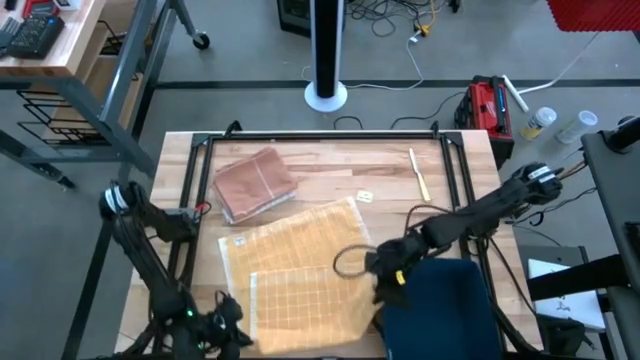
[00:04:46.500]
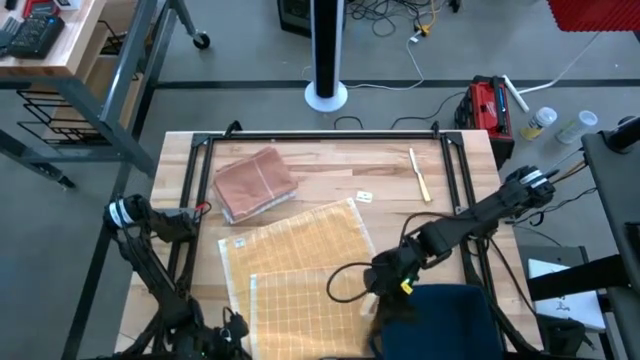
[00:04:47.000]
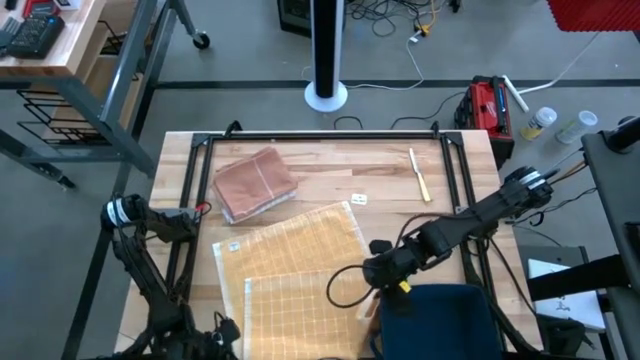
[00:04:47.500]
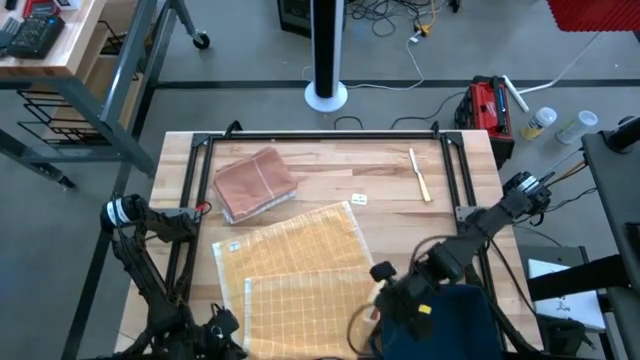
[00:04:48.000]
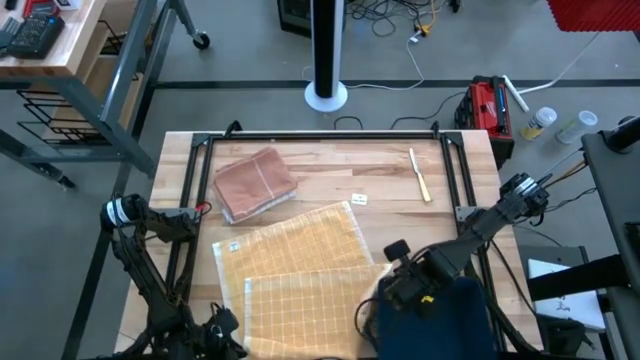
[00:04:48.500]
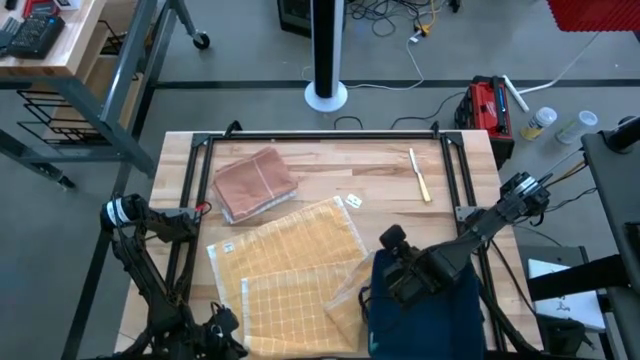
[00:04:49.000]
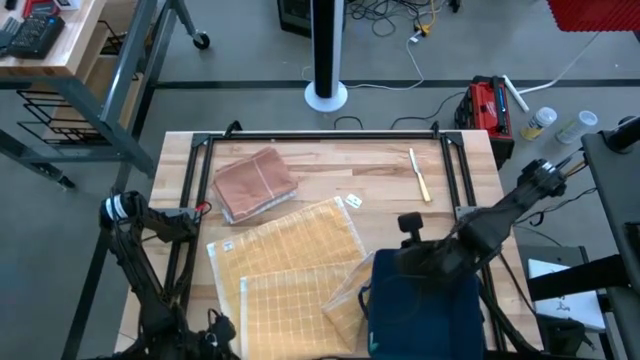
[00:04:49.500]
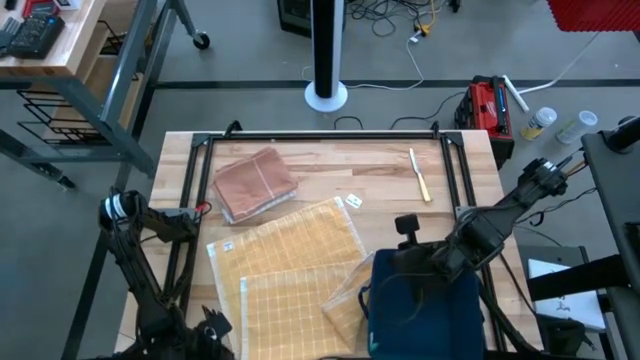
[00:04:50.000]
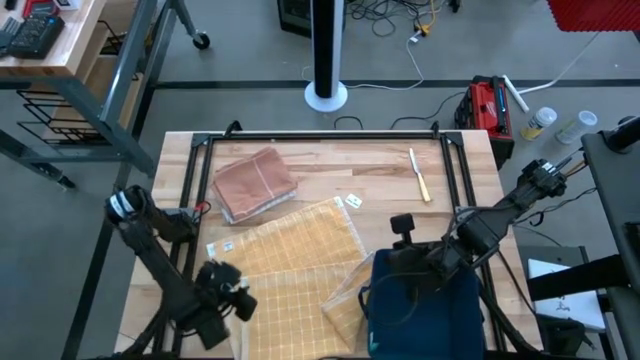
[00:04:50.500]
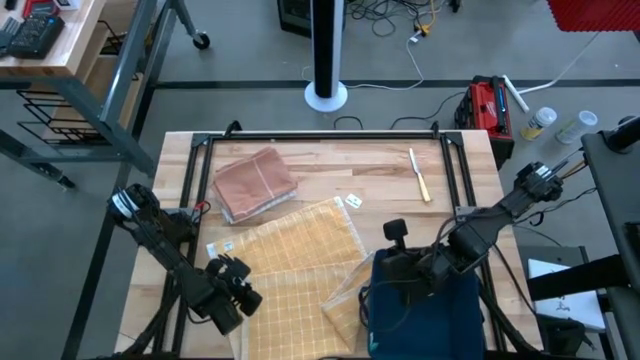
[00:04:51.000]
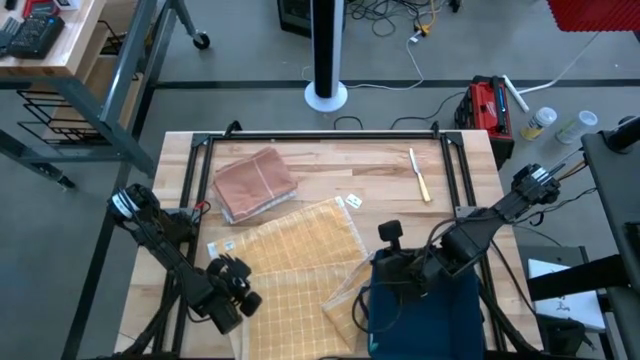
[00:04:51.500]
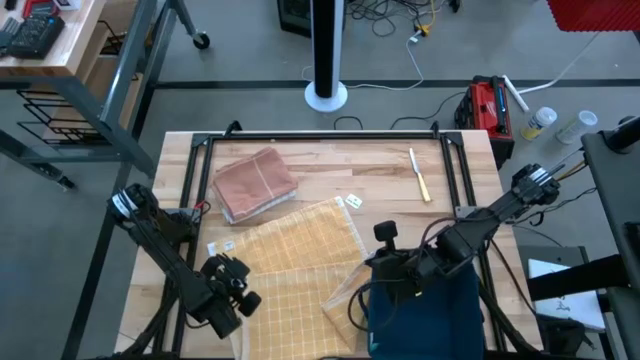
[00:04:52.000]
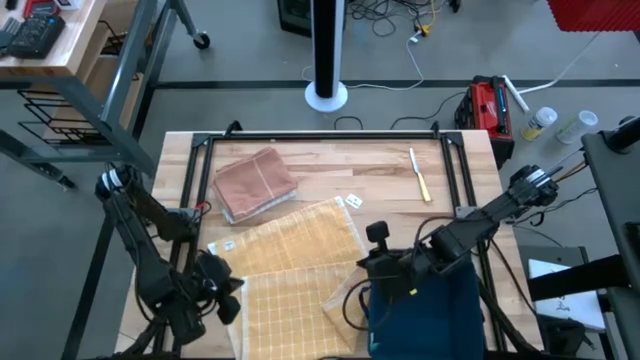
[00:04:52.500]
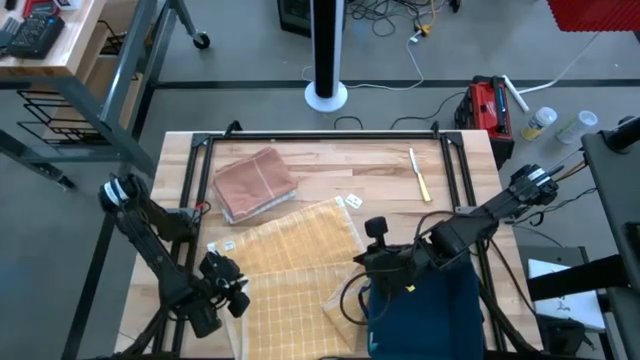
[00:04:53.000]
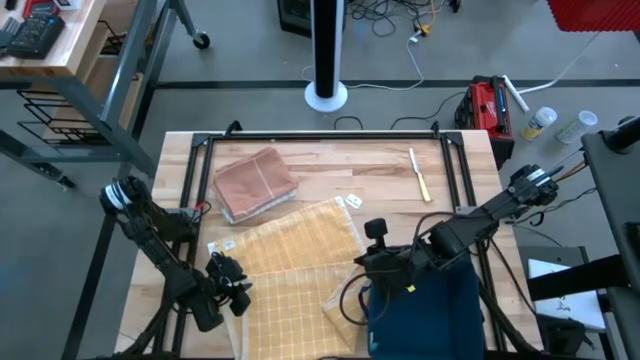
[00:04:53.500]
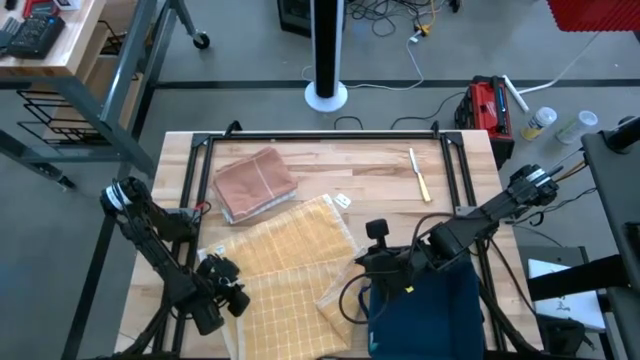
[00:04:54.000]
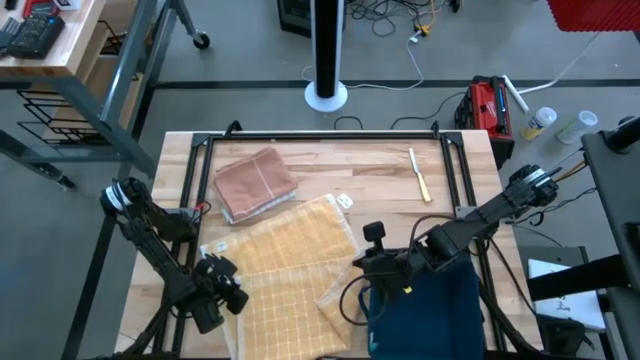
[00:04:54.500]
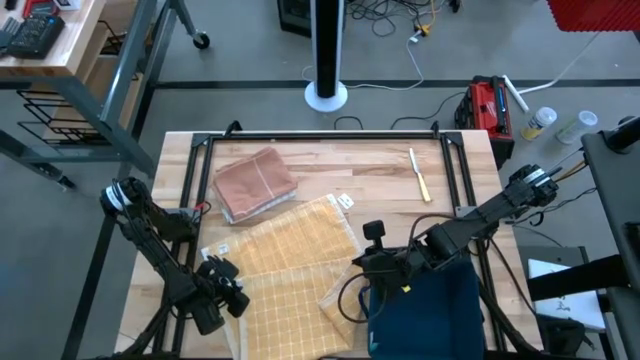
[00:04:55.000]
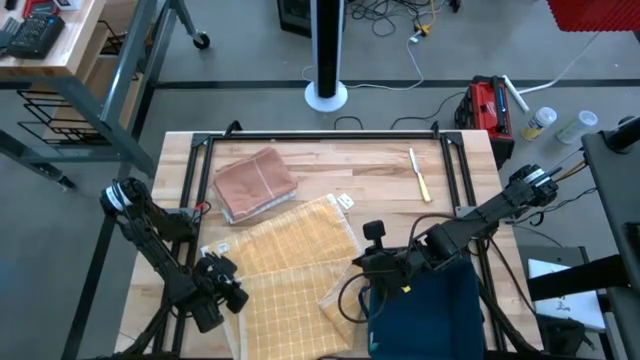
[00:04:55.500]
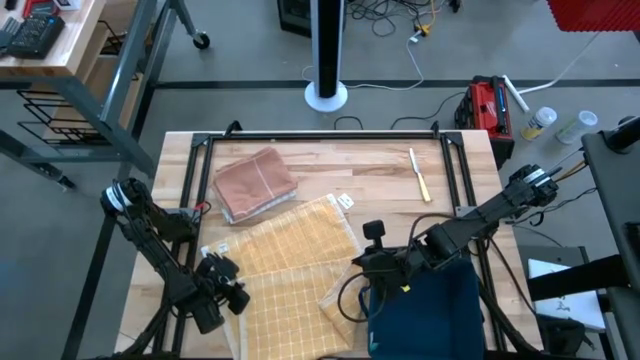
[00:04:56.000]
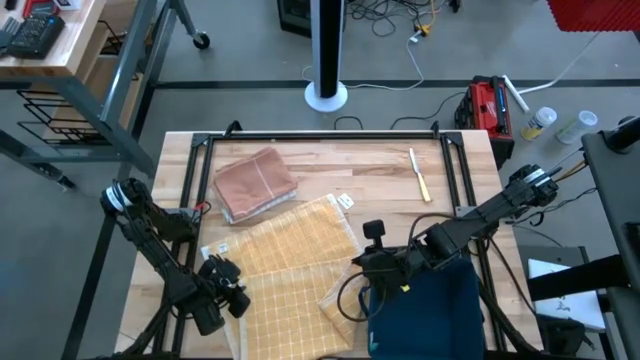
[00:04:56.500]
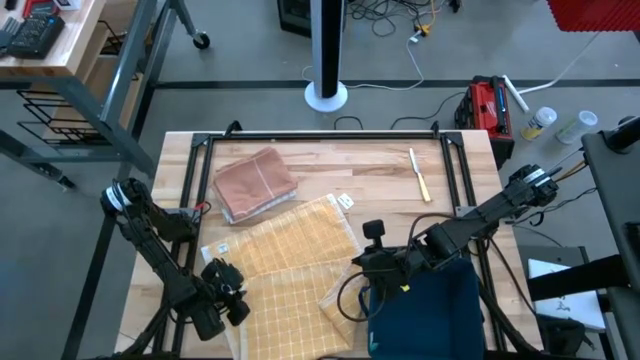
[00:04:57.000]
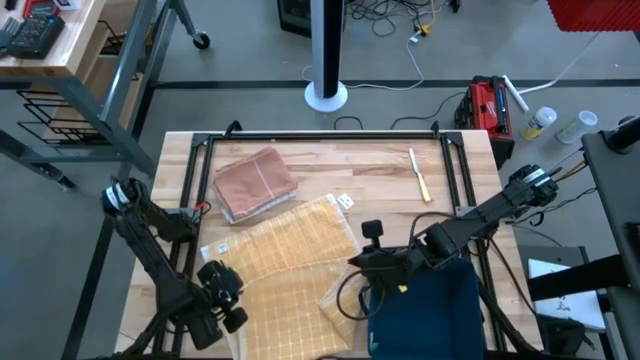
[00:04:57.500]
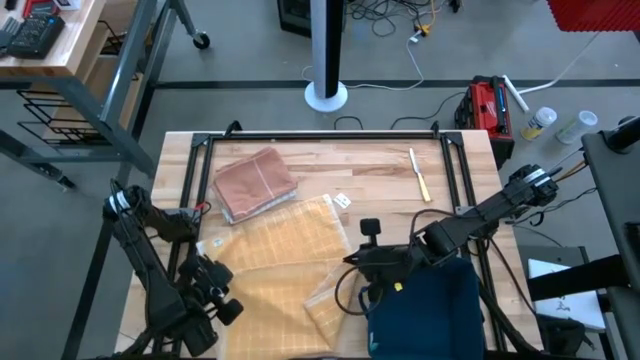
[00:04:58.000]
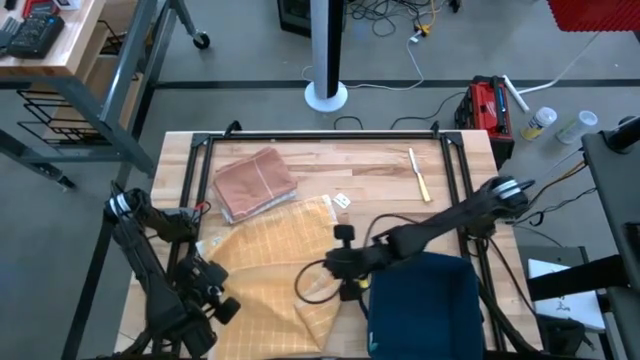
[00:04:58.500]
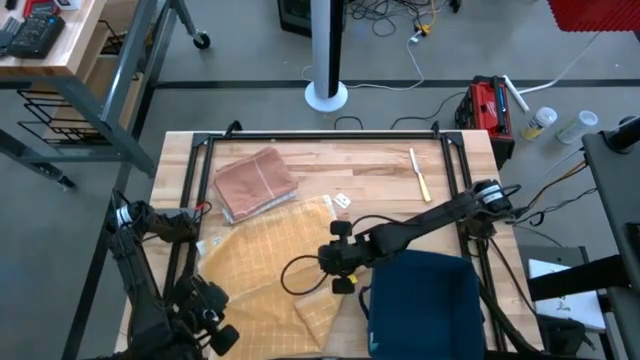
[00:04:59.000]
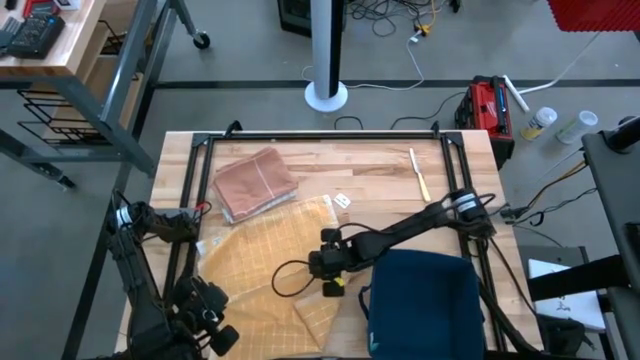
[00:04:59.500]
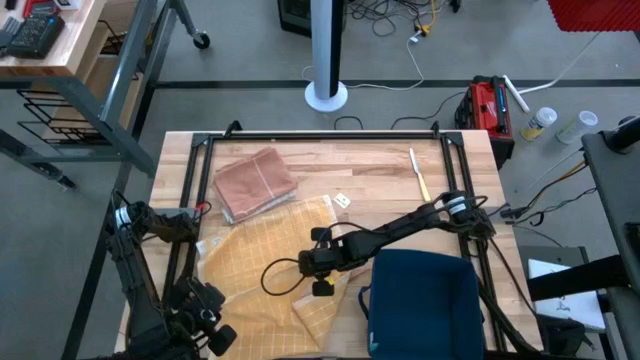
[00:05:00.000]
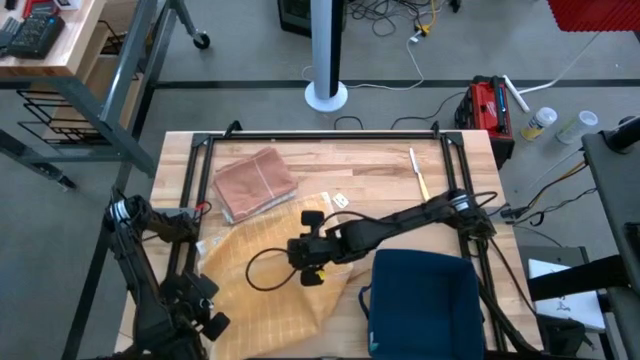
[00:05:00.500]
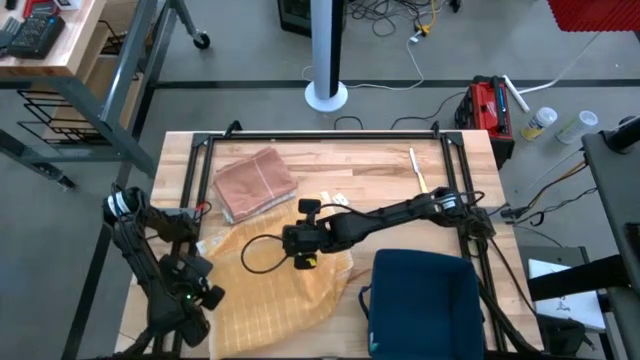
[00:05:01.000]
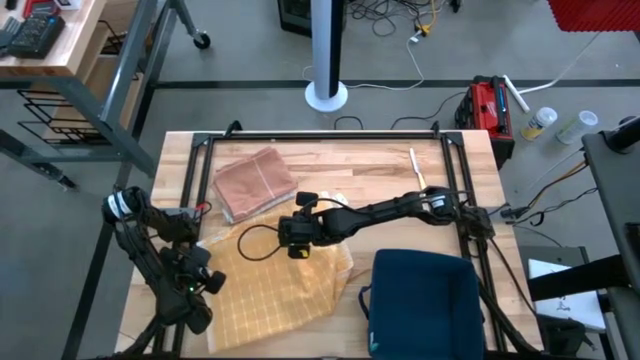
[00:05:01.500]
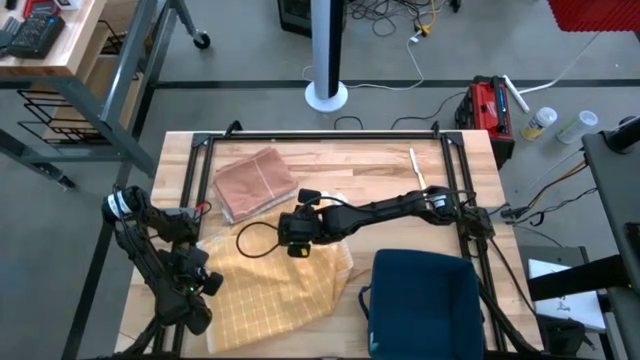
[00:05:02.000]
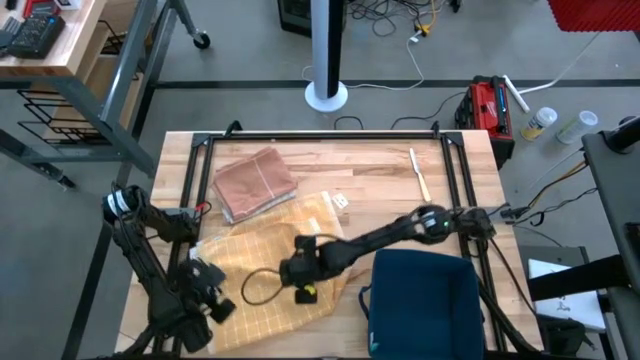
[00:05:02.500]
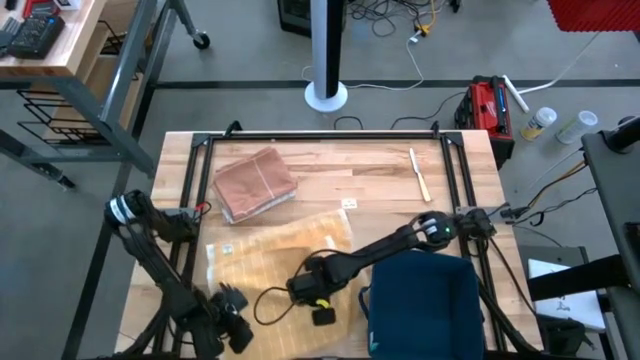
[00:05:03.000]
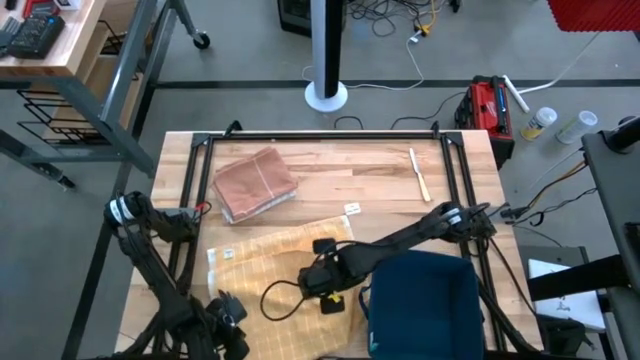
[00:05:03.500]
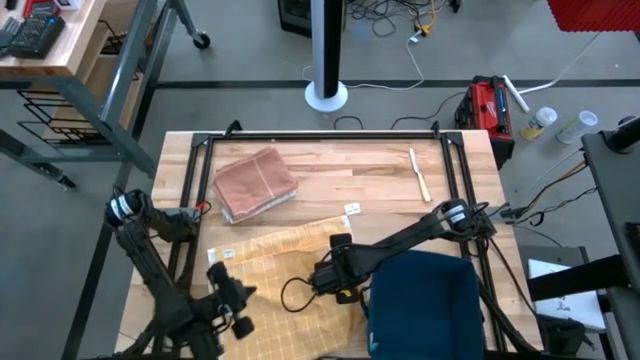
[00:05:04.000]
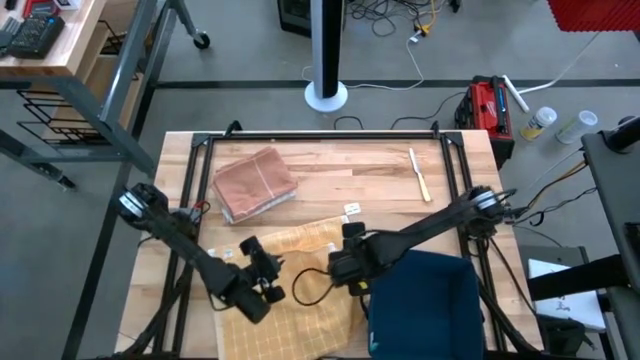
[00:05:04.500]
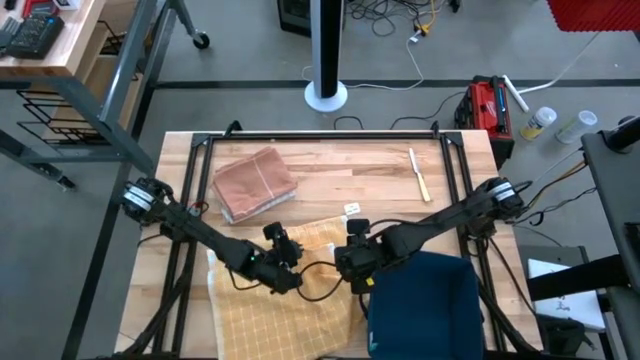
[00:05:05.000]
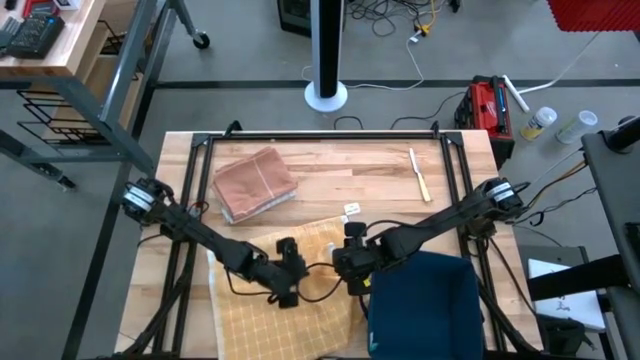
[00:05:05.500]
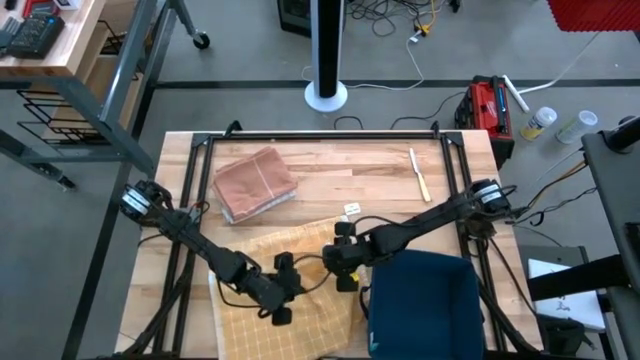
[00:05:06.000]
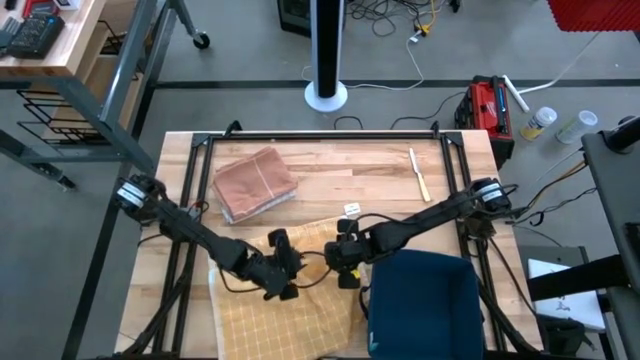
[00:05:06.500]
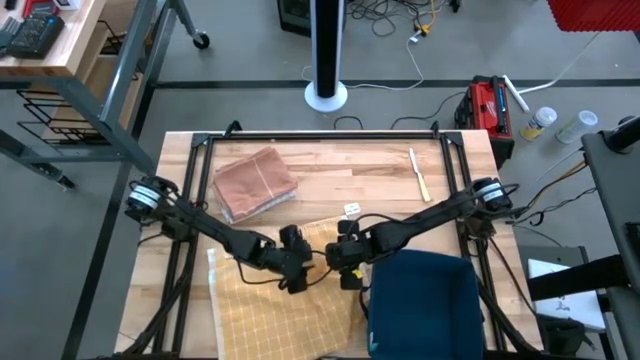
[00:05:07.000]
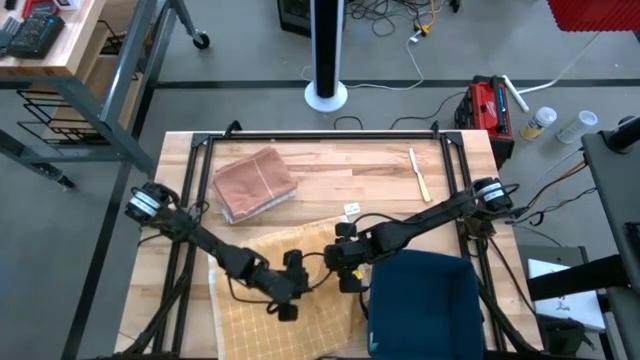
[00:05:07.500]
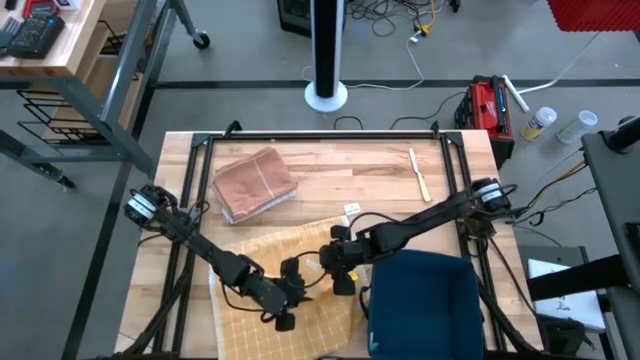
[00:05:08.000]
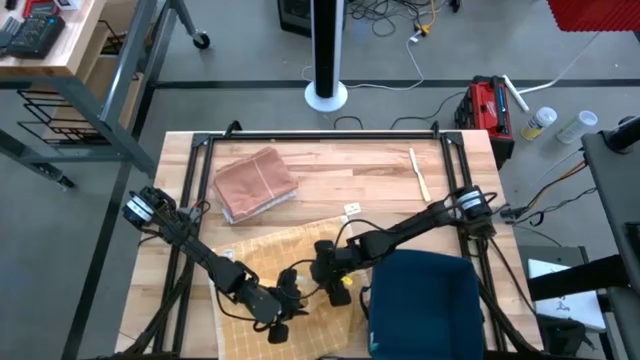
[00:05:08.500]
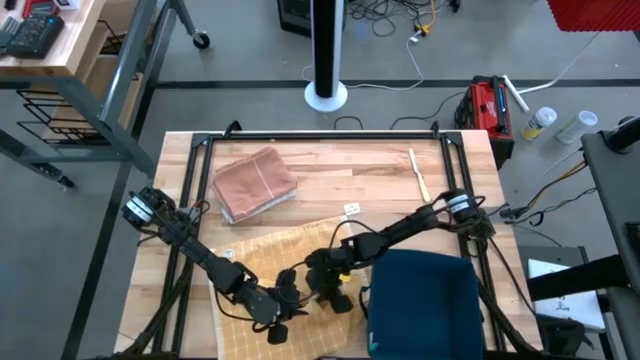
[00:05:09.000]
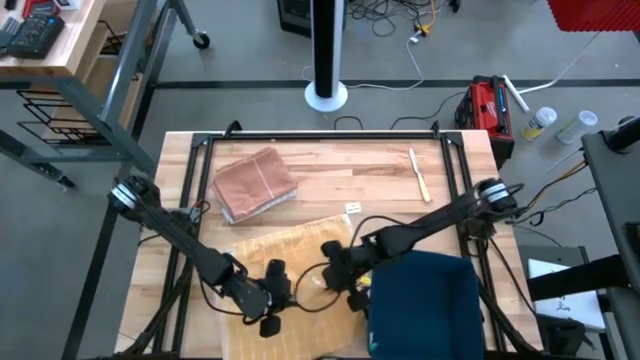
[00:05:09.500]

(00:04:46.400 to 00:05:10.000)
Task: Fold towel
Fold the yellow towel
